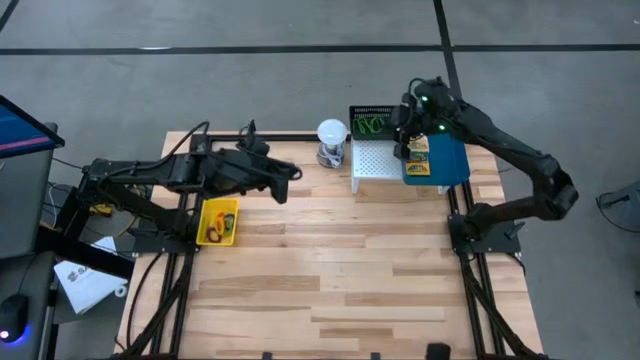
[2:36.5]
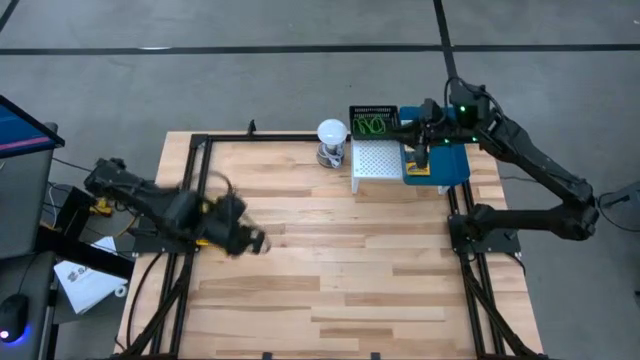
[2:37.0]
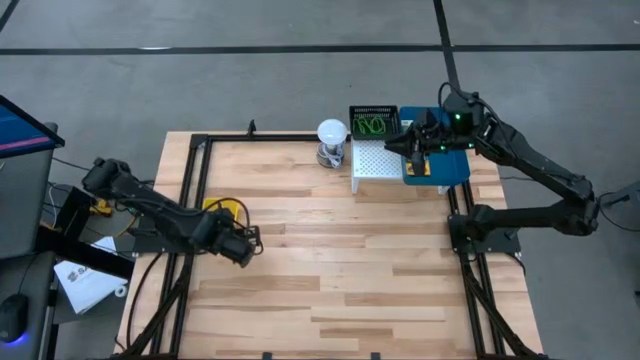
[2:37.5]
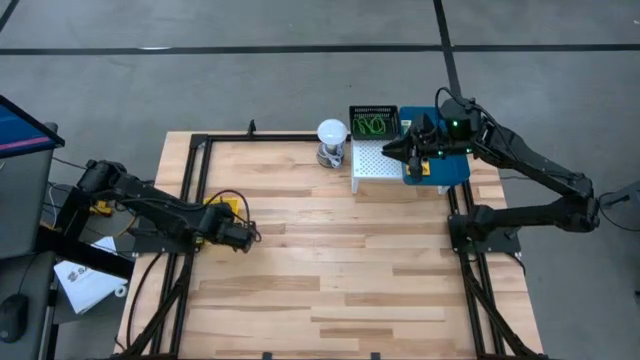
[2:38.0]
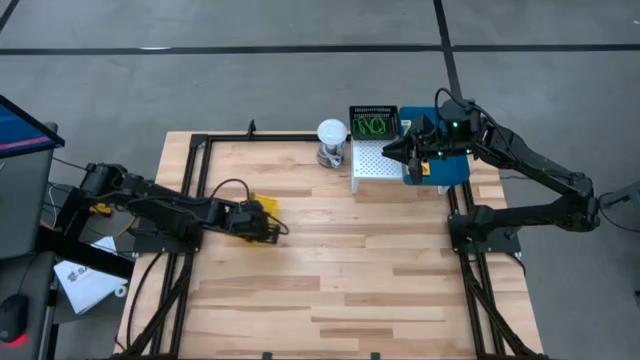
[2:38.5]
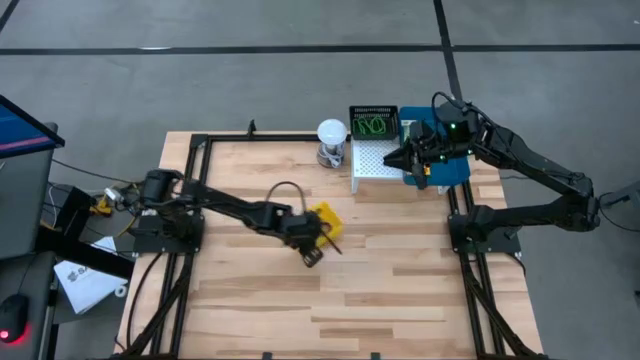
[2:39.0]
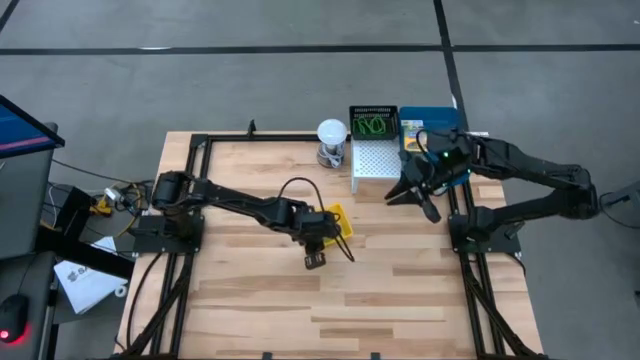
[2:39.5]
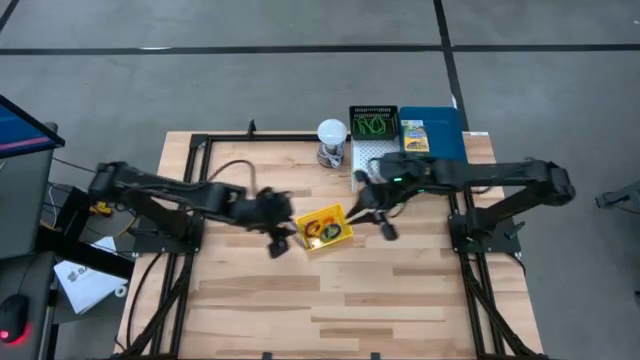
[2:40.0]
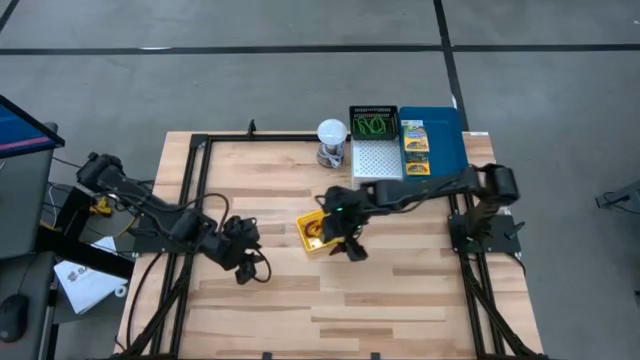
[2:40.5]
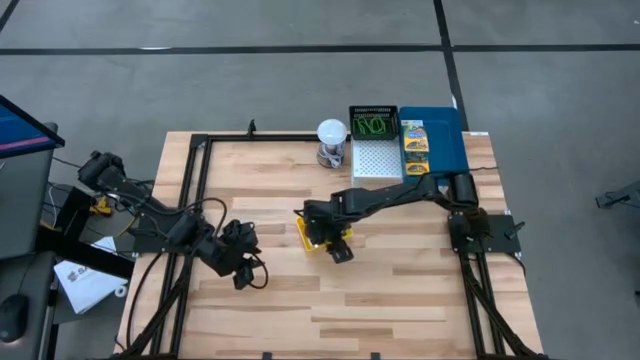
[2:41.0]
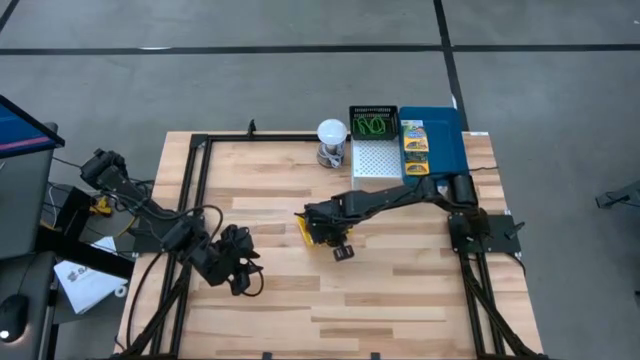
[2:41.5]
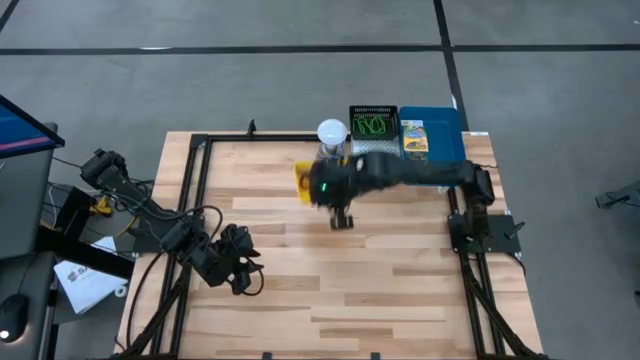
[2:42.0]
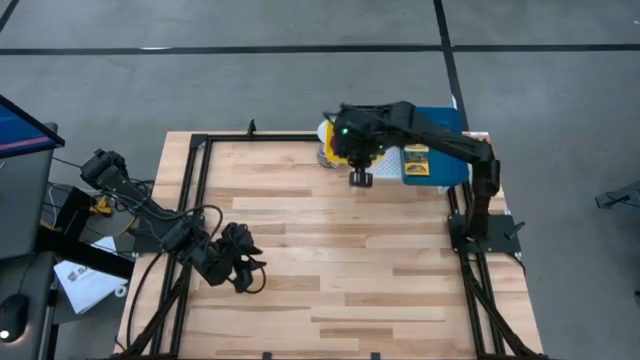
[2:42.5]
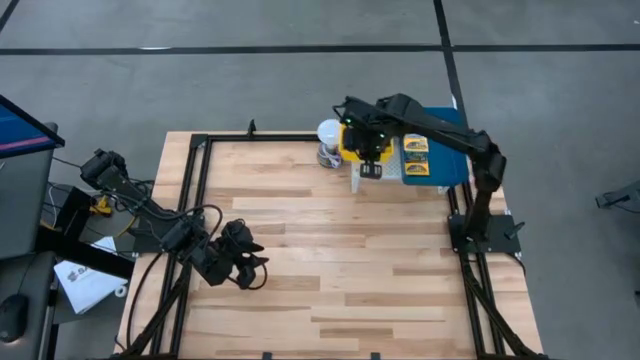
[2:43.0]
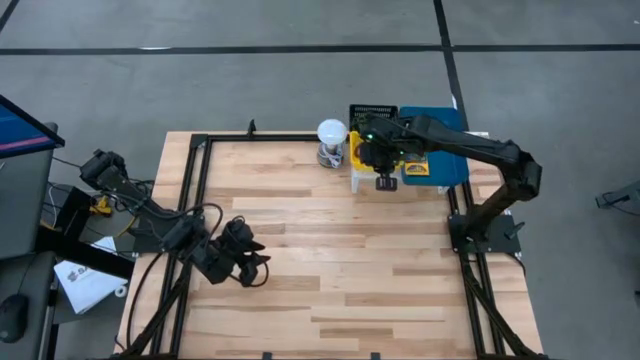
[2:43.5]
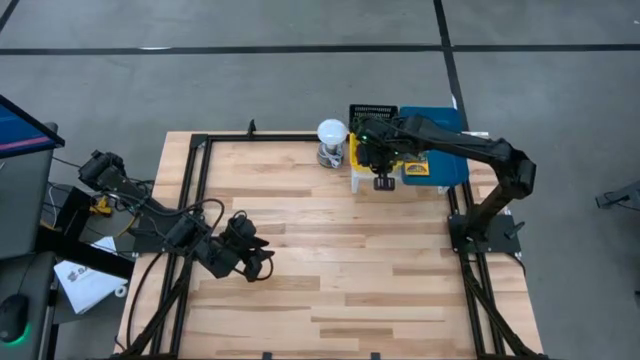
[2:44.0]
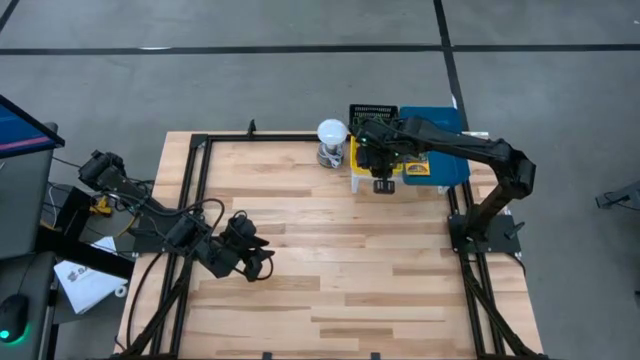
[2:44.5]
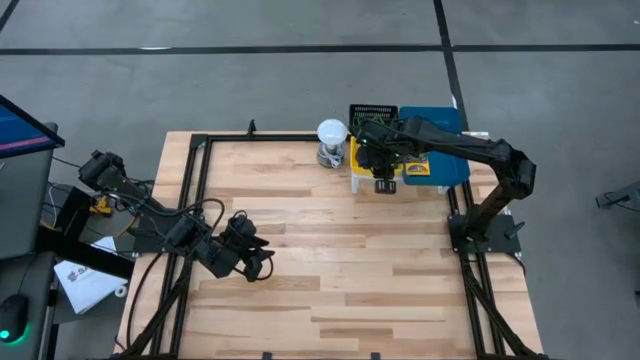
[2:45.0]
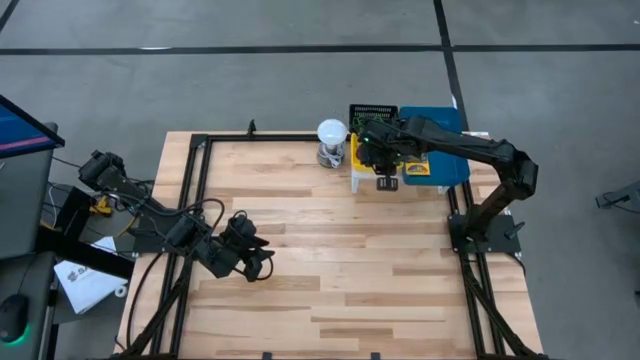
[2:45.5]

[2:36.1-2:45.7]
Task: Pick & Place Office Desk Supplies
Put the yellow bin on the shelf

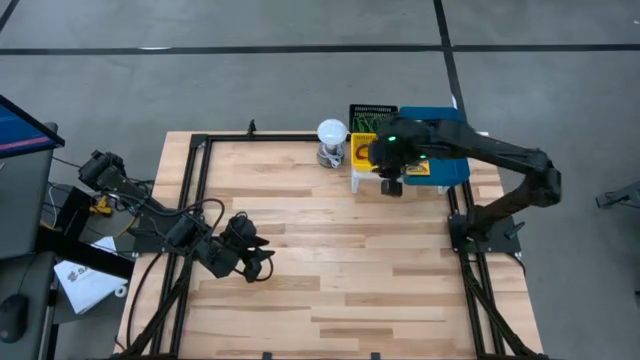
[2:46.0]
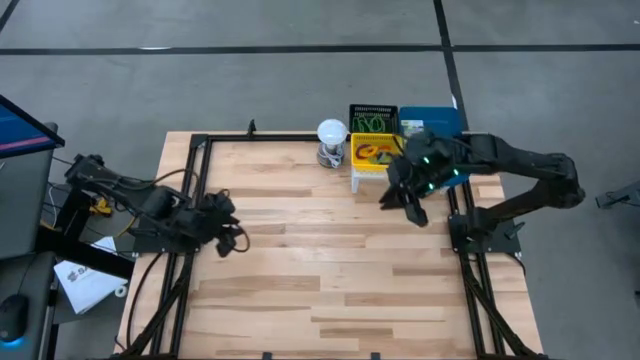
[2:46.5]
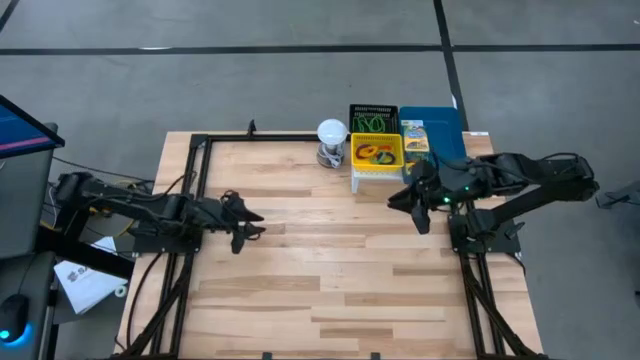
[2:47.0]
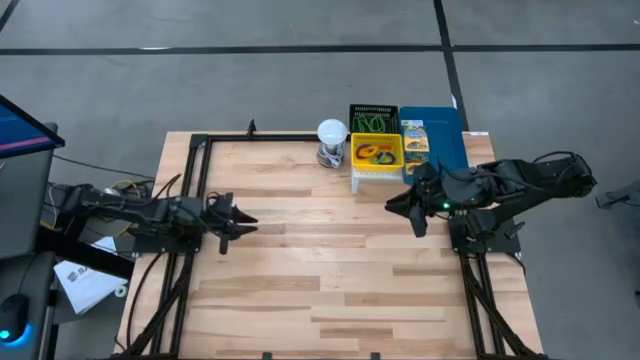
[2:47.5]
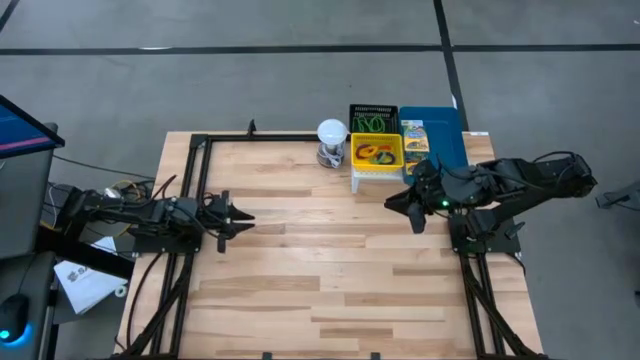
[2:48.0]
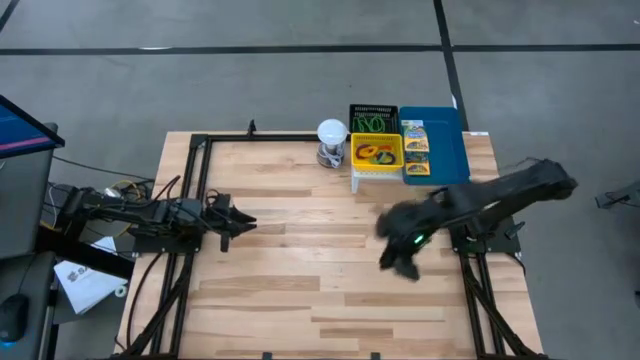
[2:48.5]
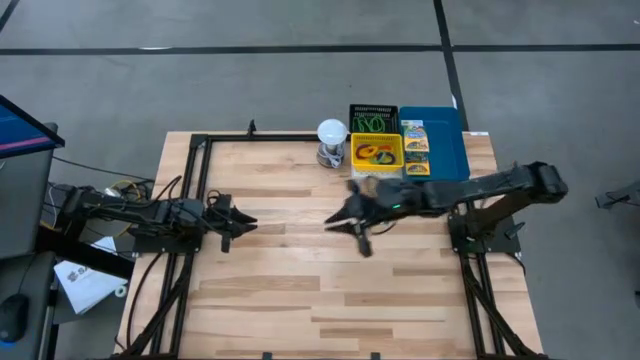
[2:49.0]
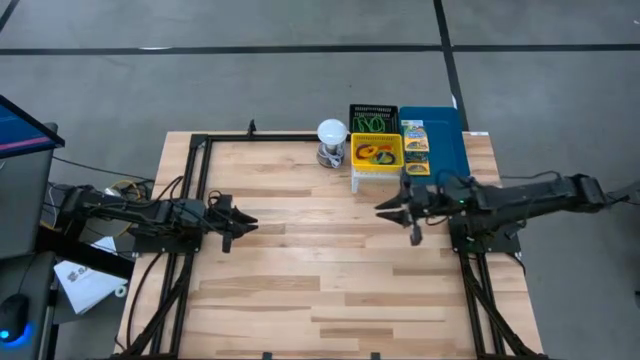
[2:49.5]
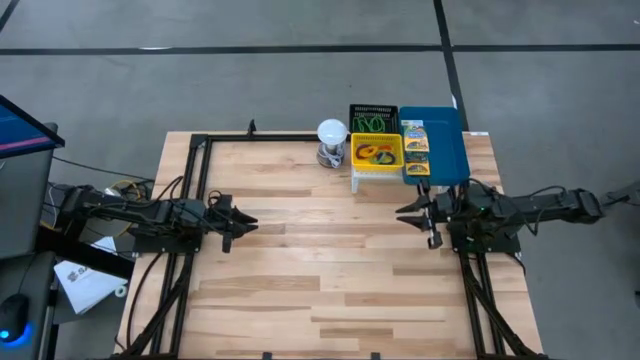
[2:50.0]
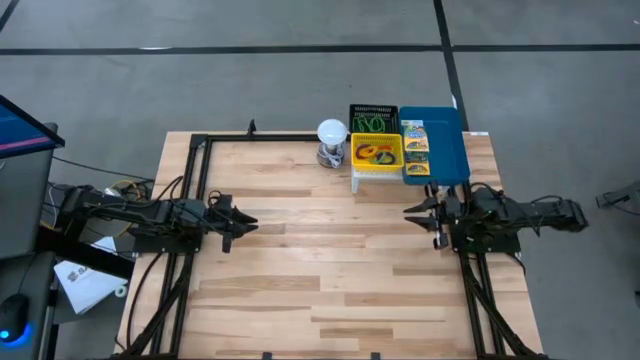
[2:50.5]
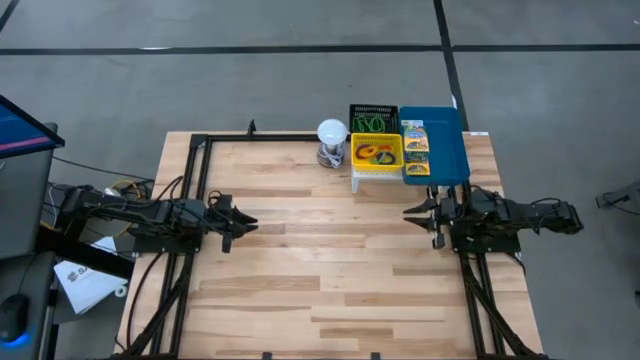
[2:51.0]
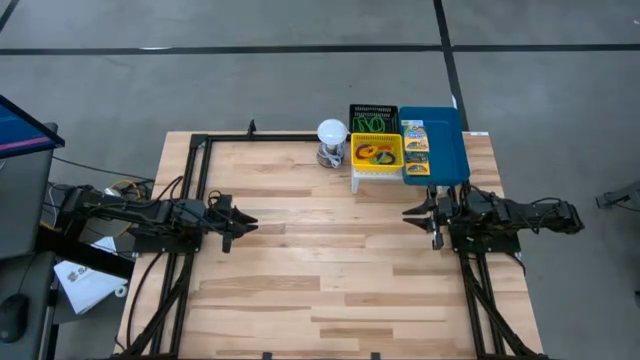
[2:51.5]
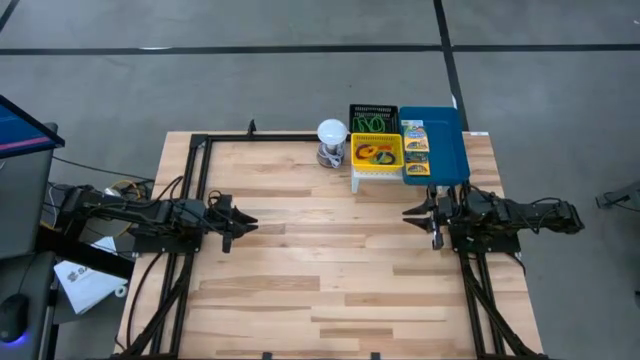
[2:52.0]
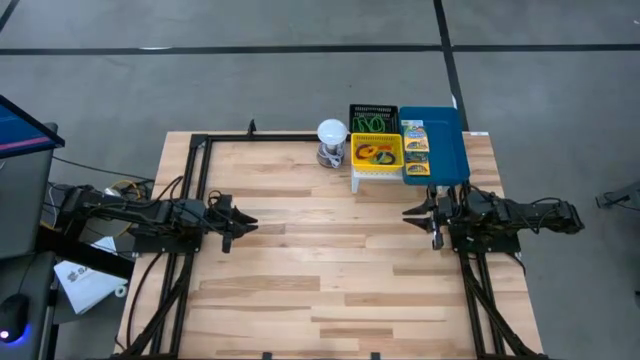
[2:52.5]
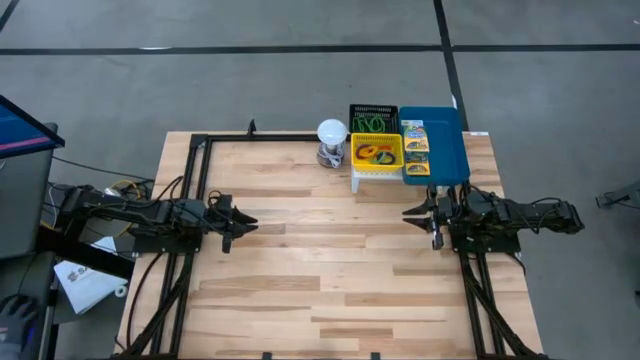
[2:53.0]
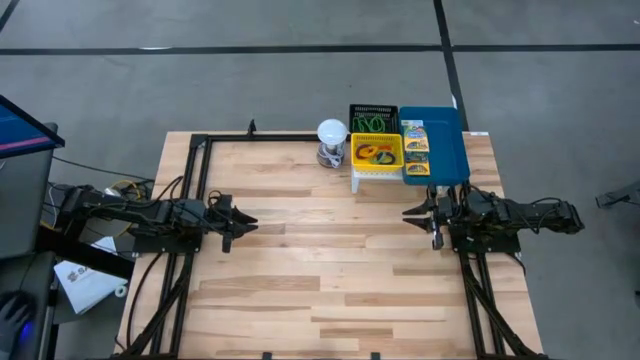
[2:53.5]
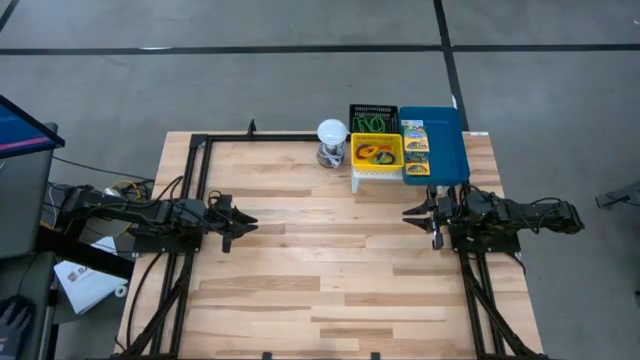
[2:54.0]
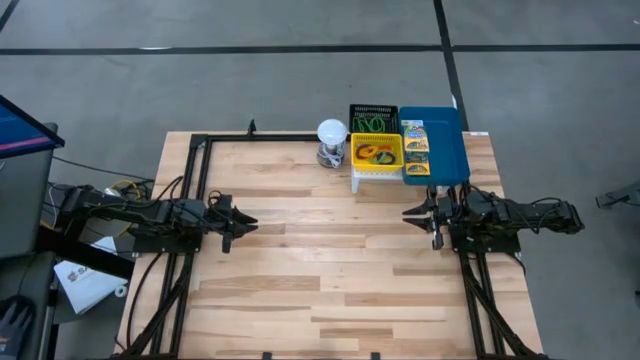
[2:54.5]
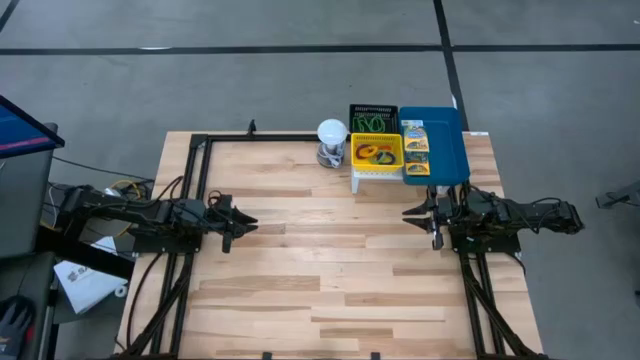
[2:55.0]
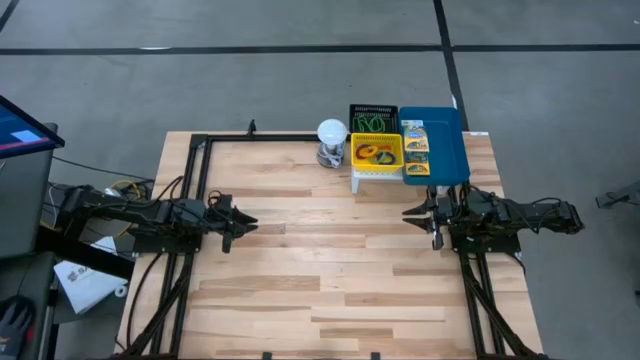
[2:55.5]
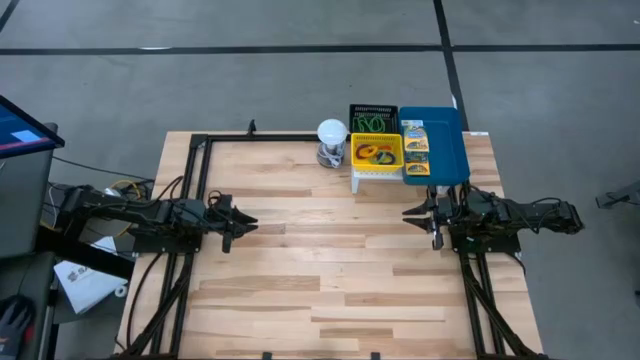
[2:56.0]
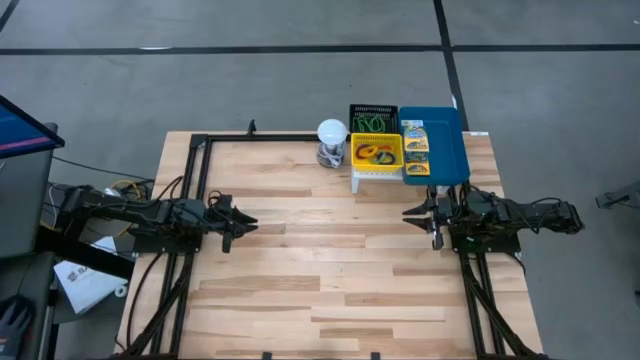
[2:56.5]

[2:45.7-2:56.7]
Return to Home Position

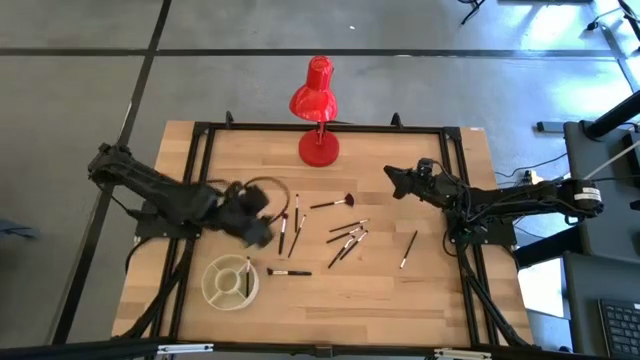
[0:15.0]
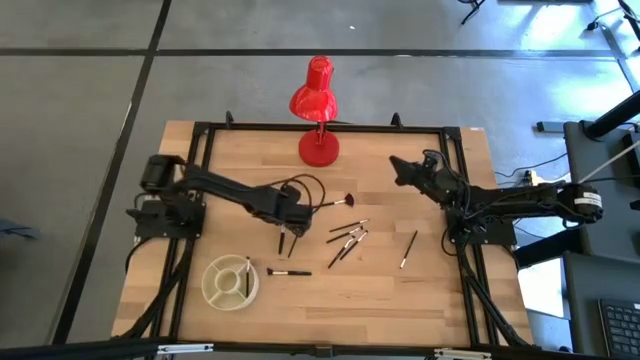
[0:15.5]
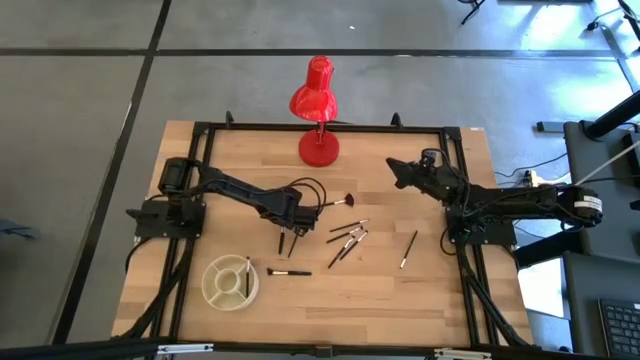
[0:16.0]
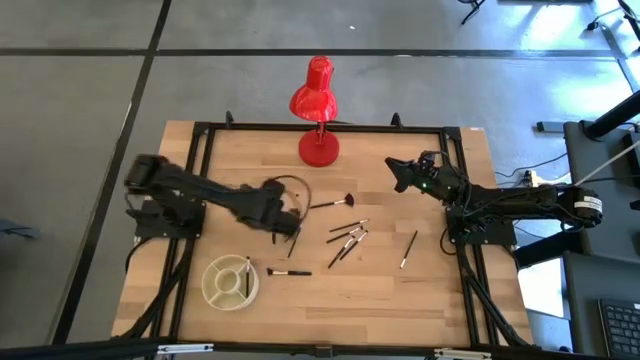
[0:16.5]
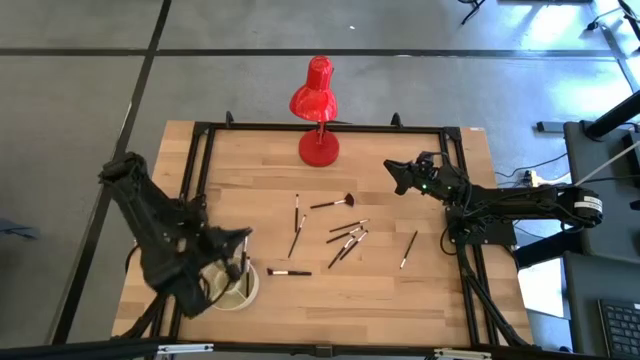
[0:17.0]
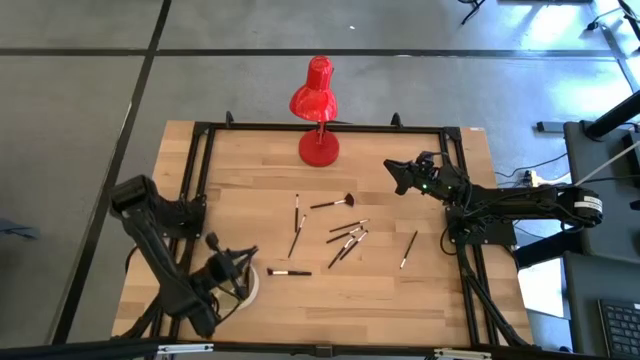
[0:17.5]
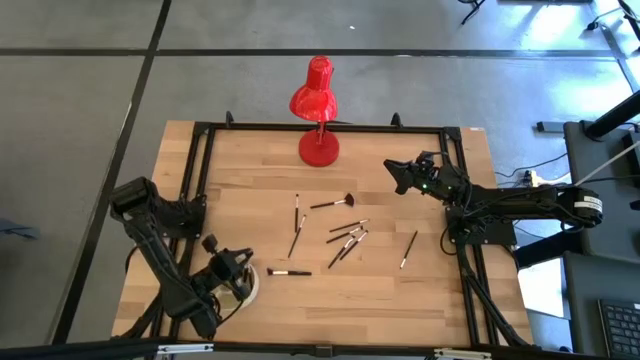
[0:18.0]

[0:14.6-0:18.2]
Task: Put items in baskets/containers
Put the top powder brush into the pen organizer
